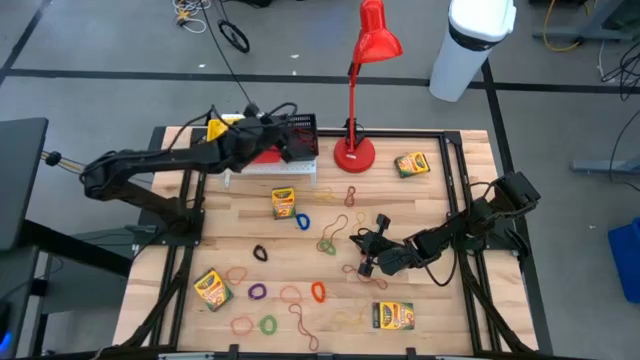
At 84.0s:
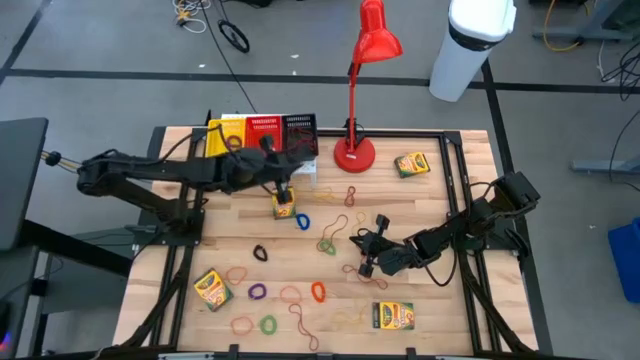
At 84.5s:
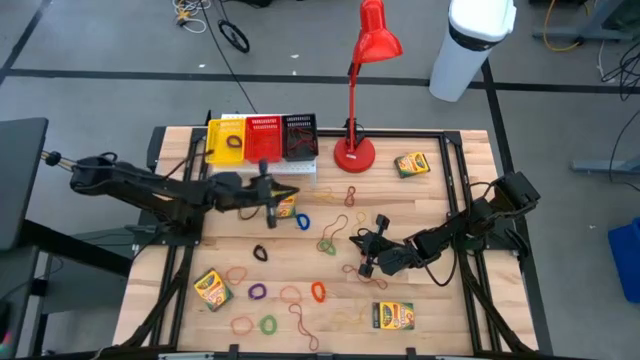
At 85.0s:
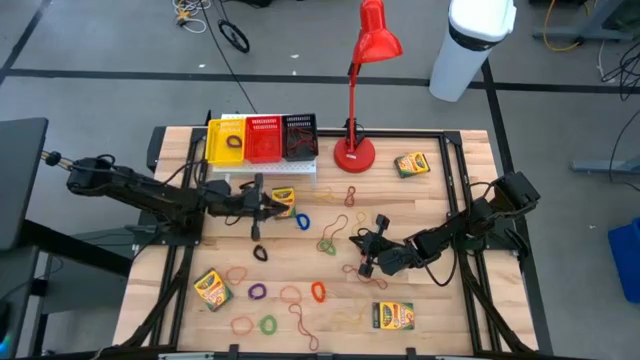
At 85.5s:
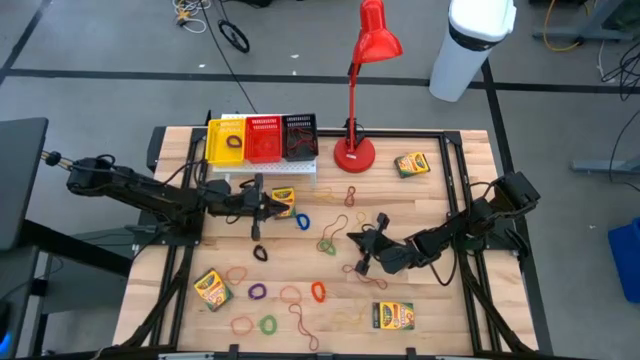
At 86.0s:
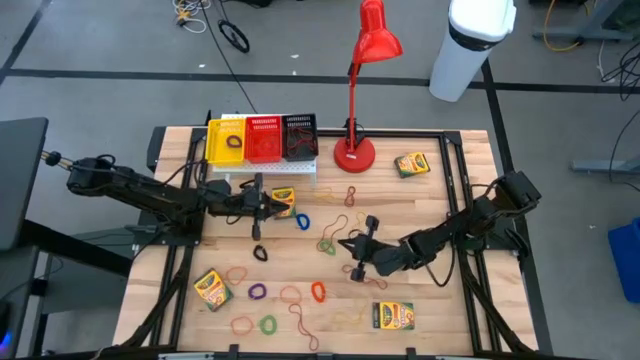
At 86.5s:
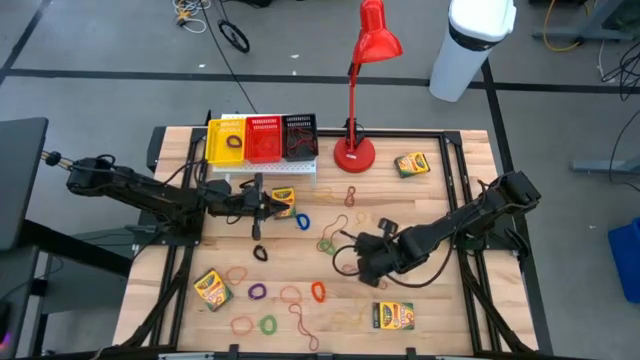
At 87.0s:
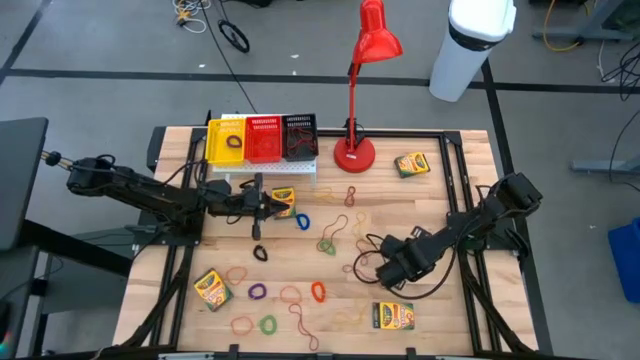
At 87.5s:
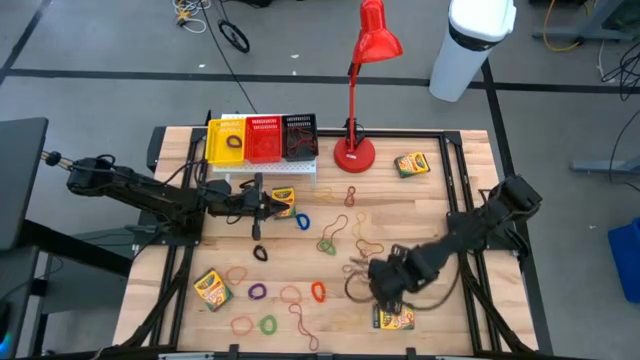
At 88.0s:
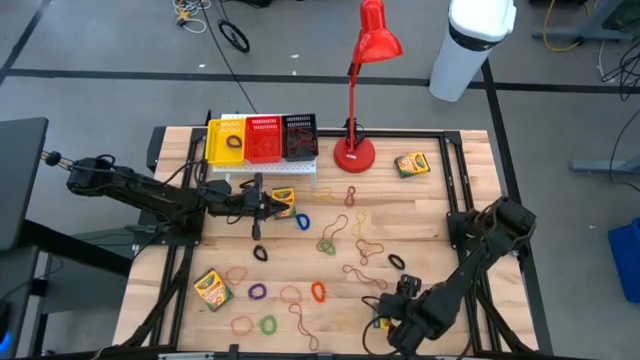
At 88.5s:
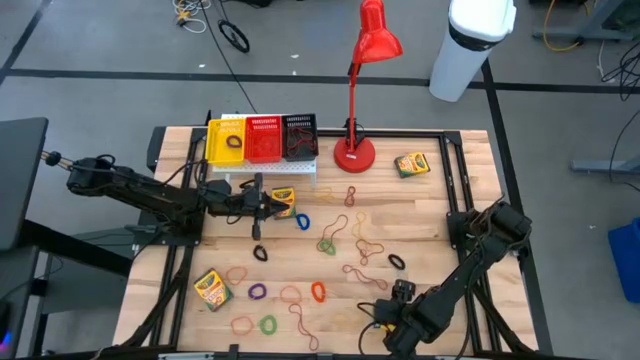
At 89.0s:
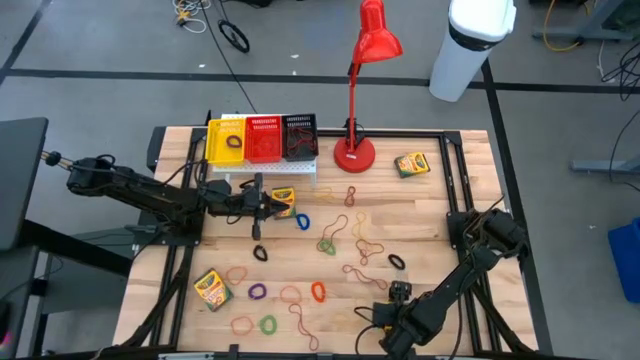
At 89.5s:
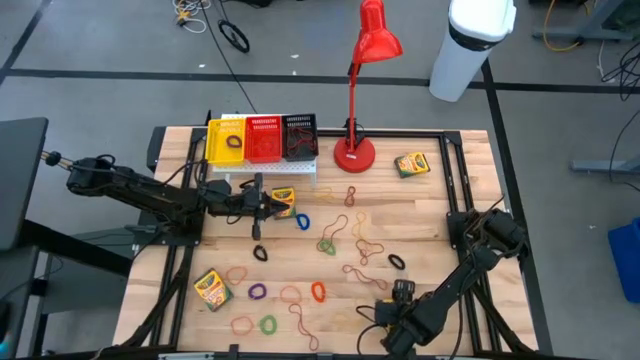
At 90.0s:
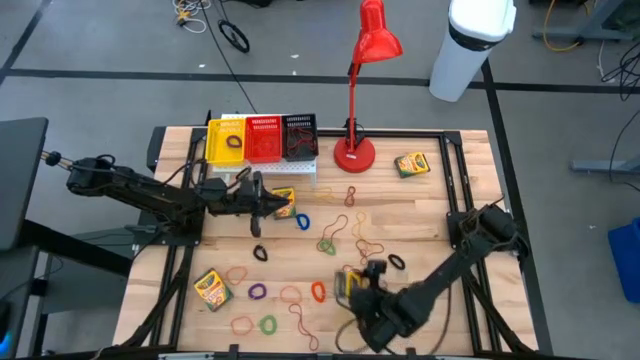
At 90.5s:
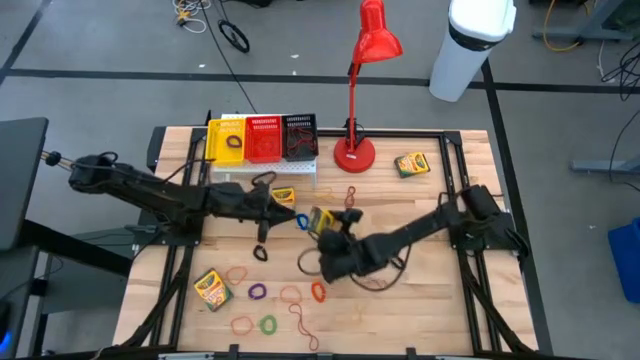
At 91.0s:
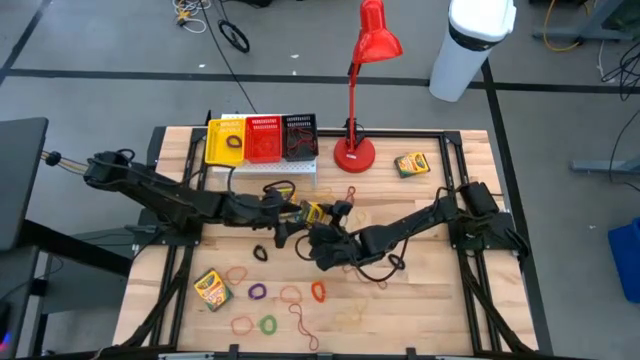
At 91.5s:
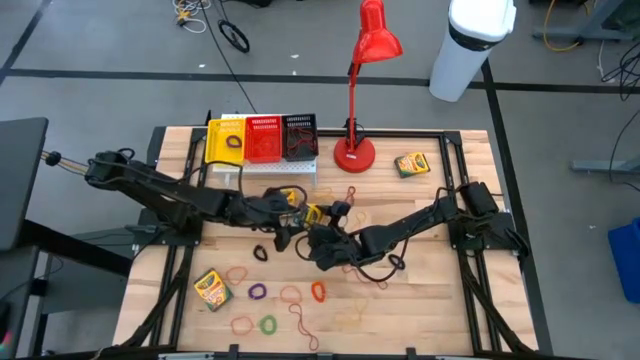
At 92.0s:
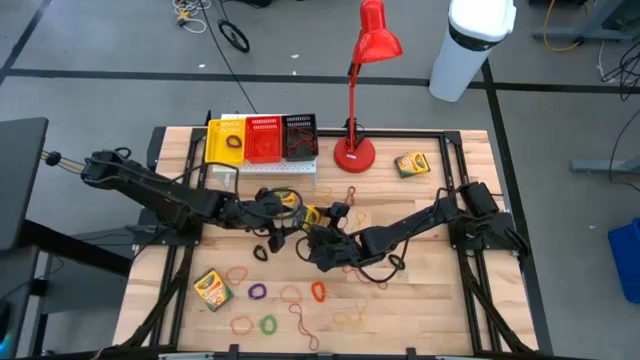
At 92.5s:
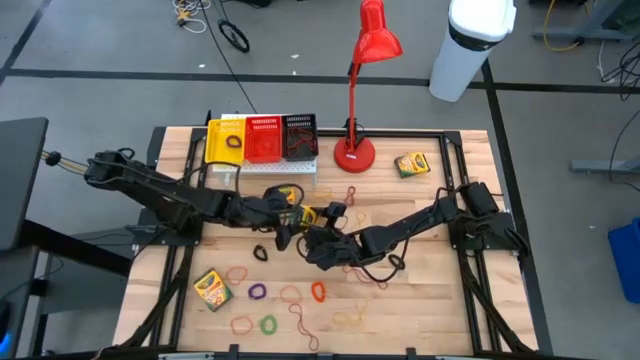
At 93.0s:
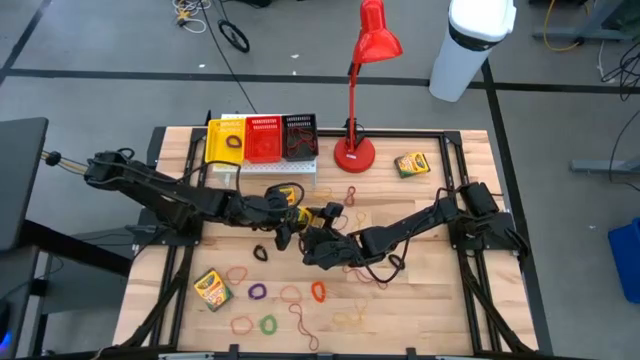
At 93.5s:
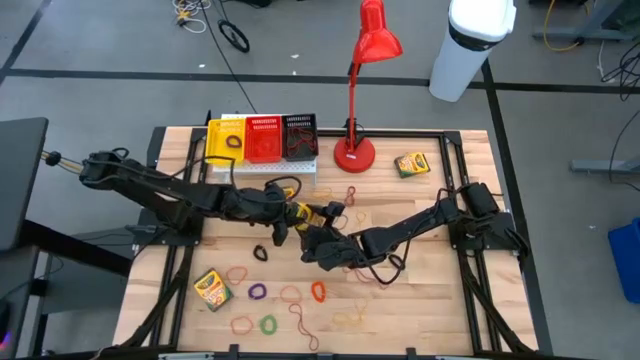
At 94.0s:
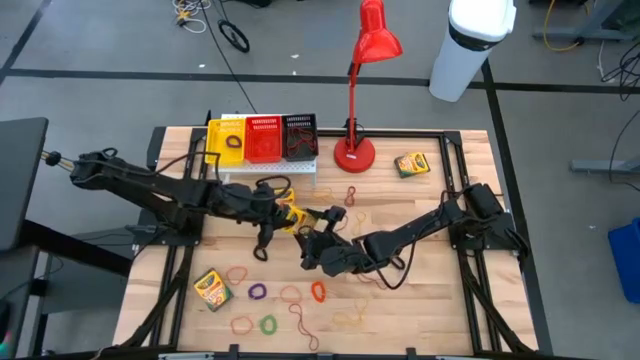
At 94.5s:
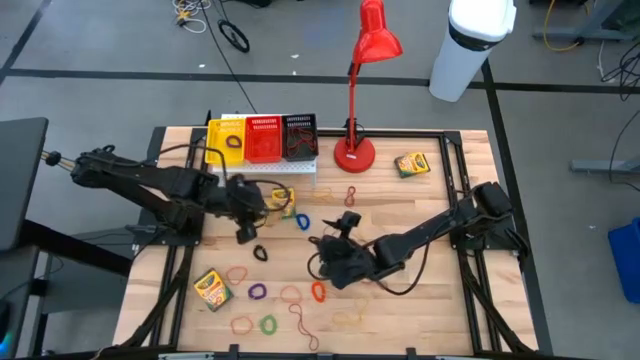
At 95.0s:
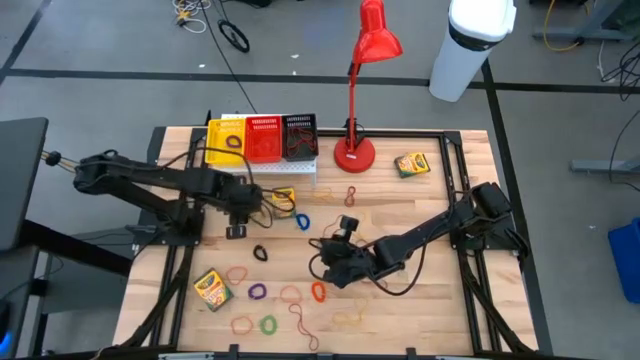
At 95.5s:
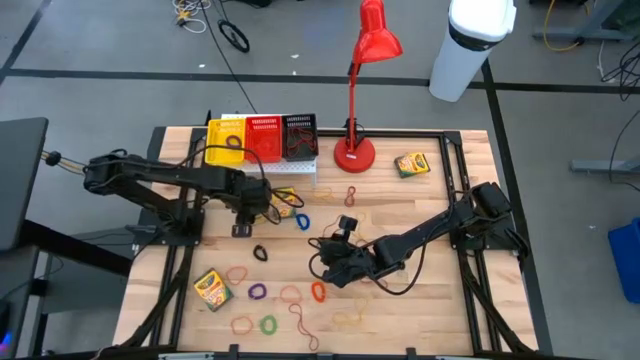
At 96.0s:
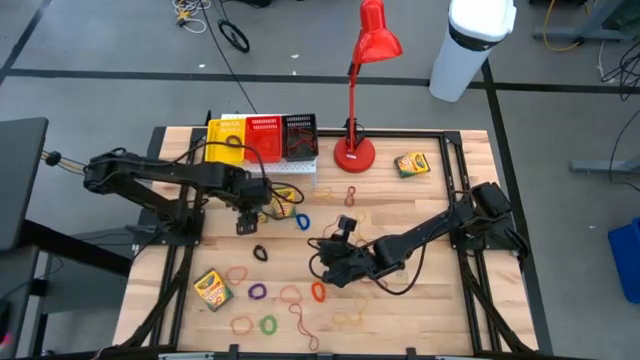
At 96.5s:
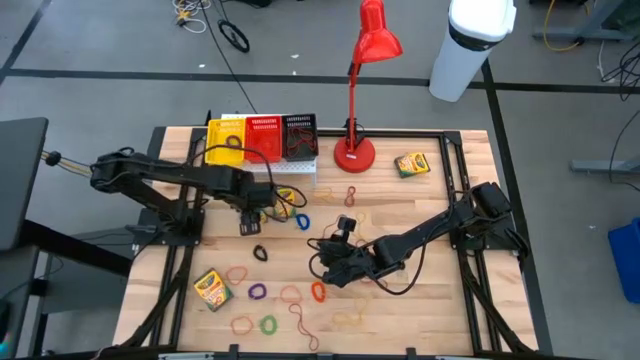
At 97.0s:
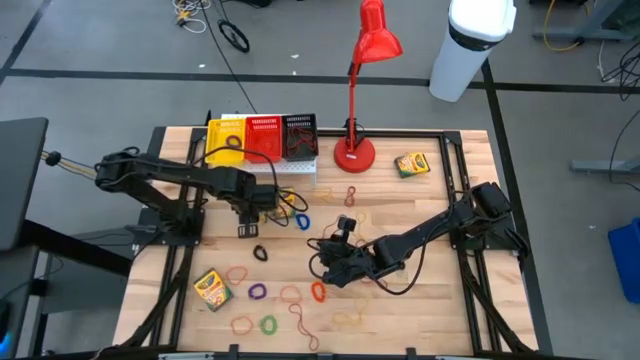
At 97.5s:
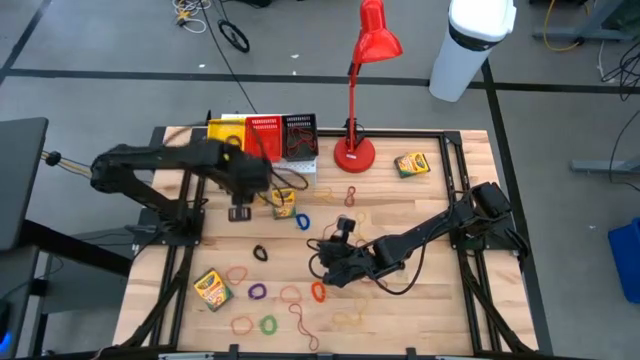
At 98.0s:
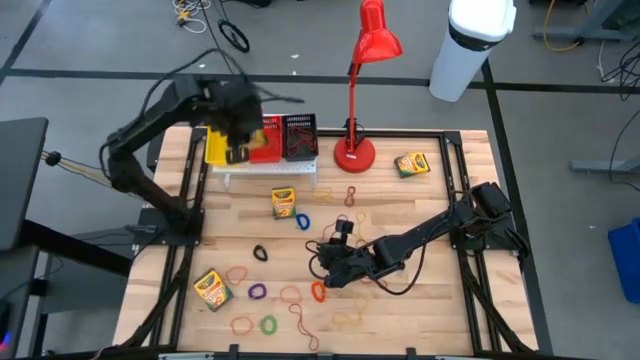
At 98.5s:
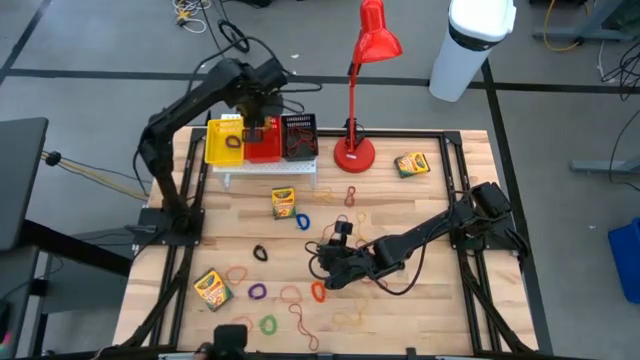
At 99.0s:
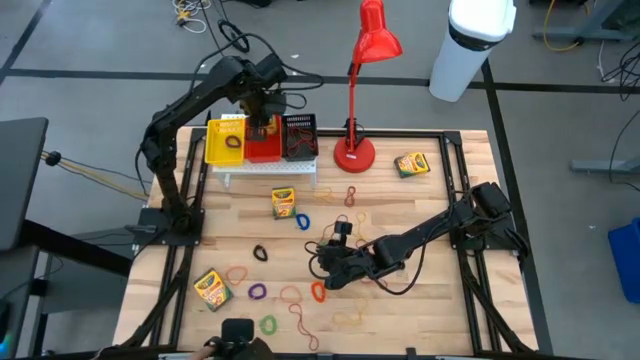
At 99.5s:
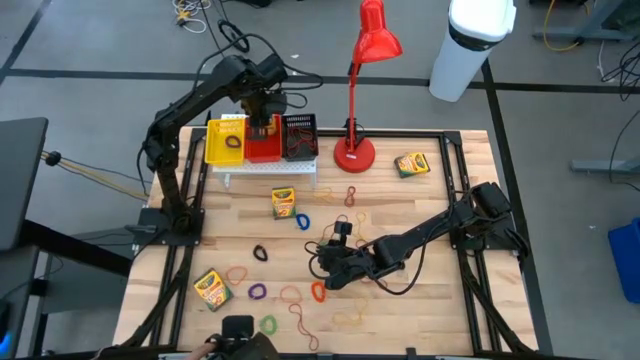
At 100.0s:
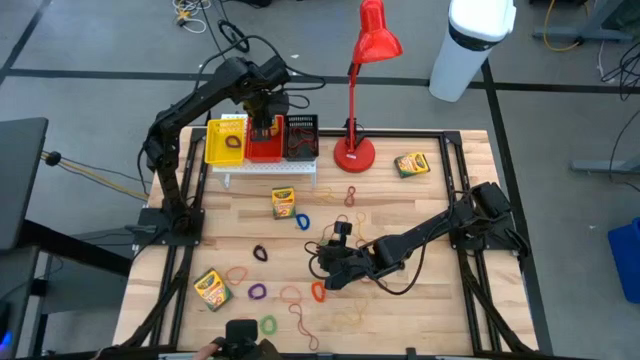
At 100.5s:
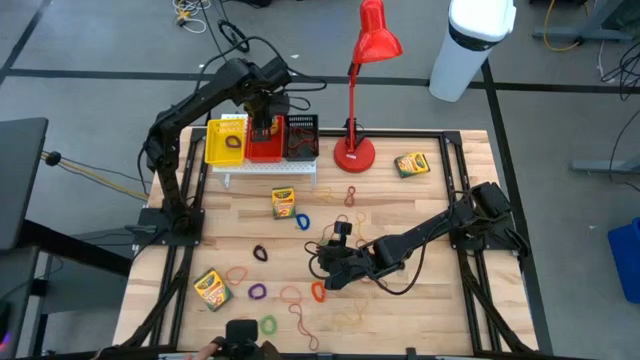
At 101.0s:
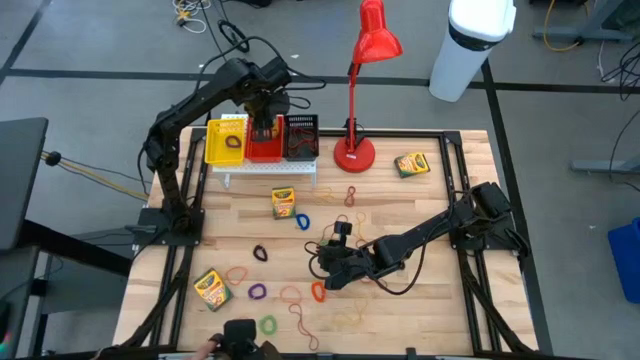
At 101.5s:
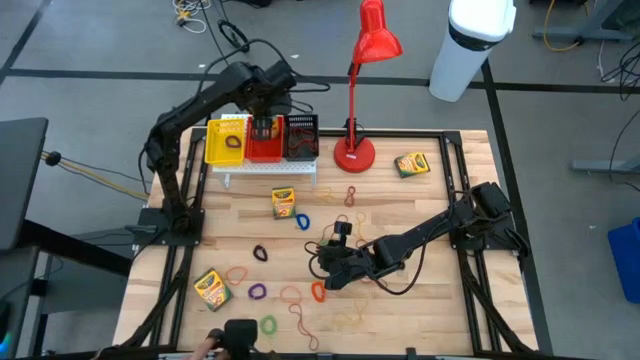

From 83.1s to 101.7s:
Task: Pick & Place Office Desk Supplies
Put the crayon box into the red bin on the shelf

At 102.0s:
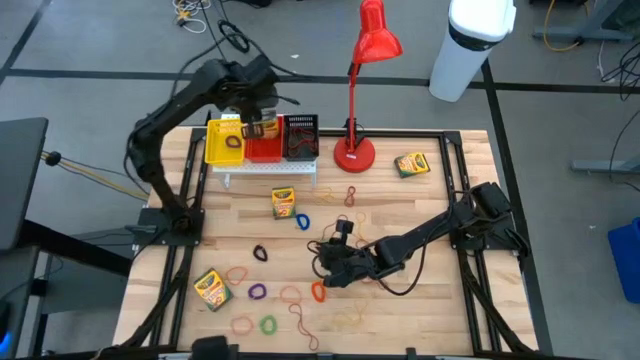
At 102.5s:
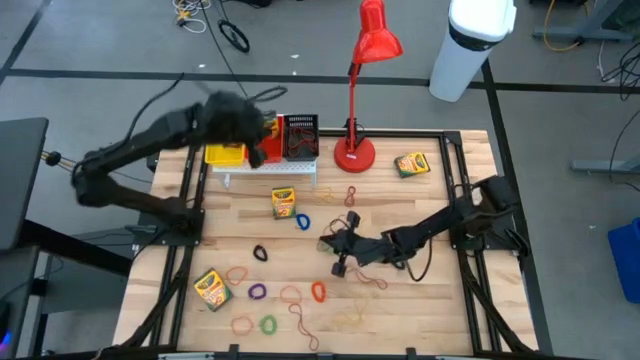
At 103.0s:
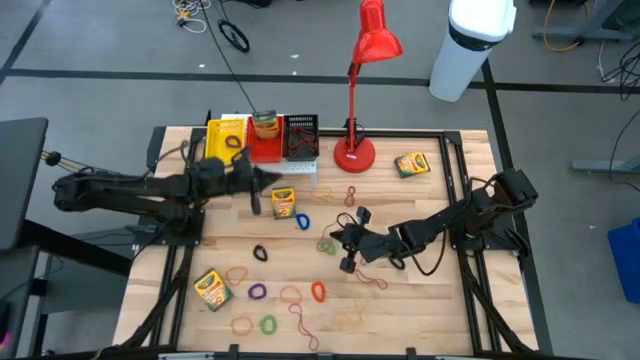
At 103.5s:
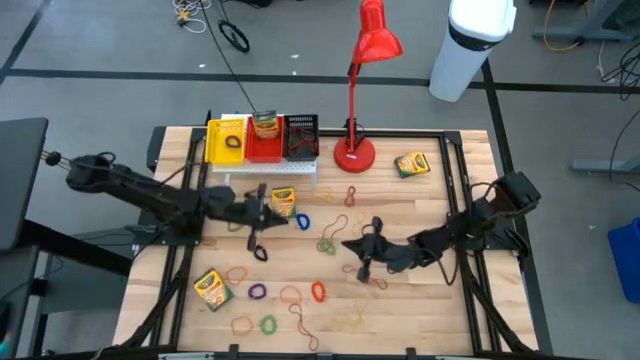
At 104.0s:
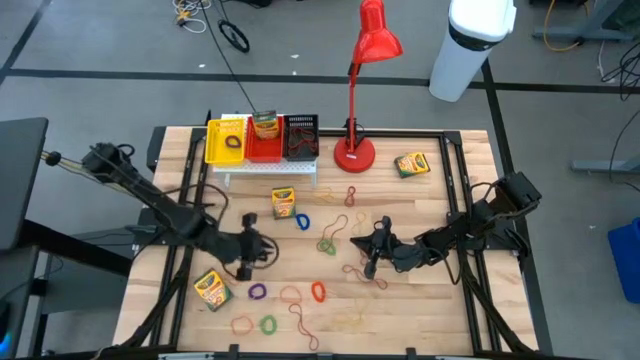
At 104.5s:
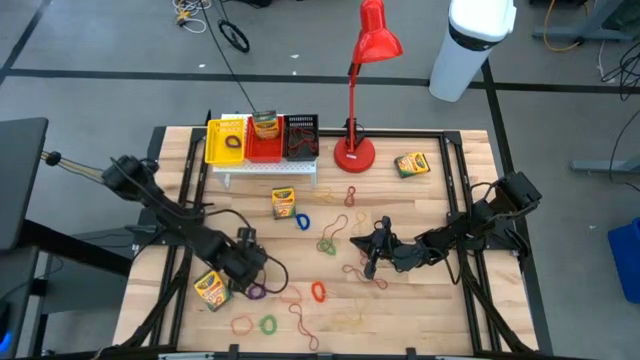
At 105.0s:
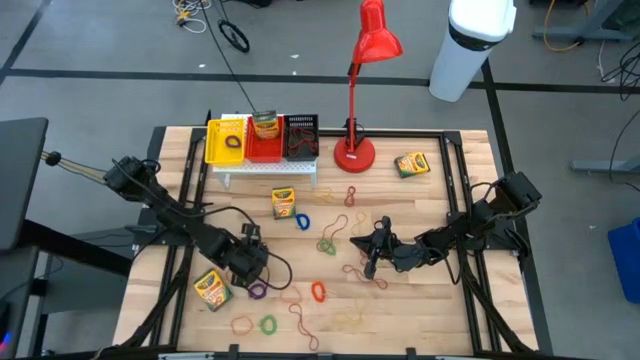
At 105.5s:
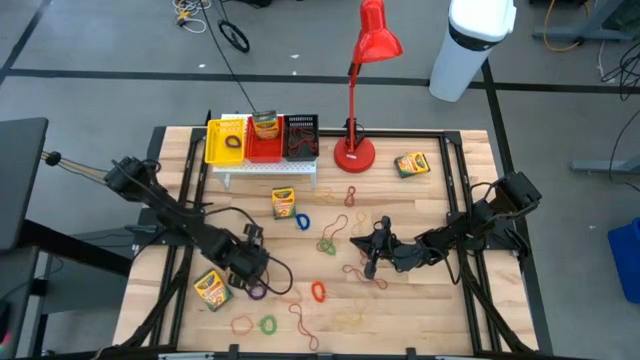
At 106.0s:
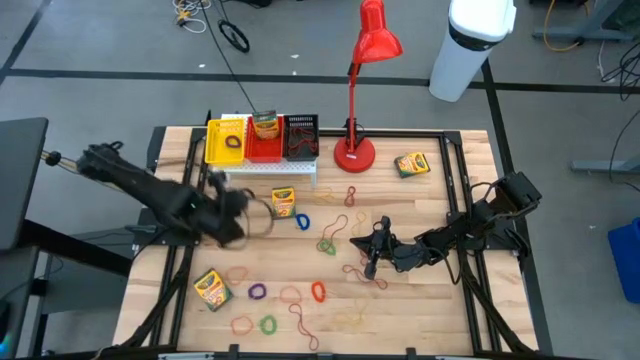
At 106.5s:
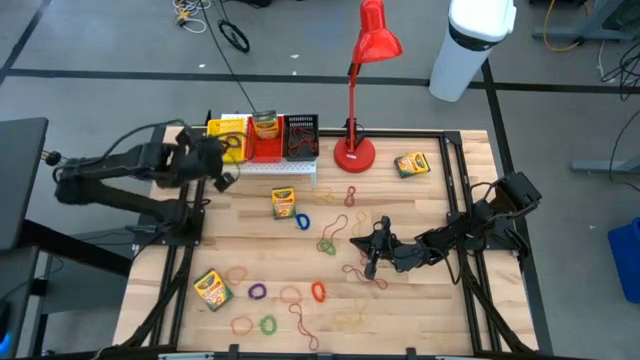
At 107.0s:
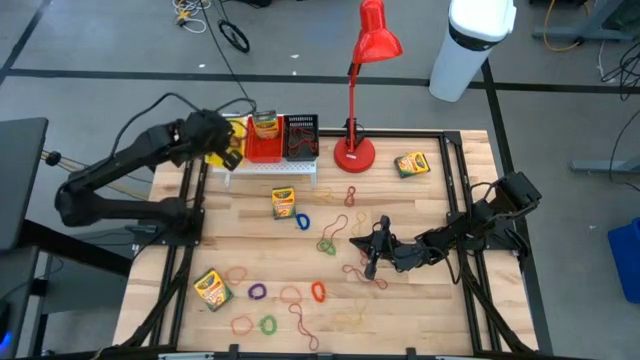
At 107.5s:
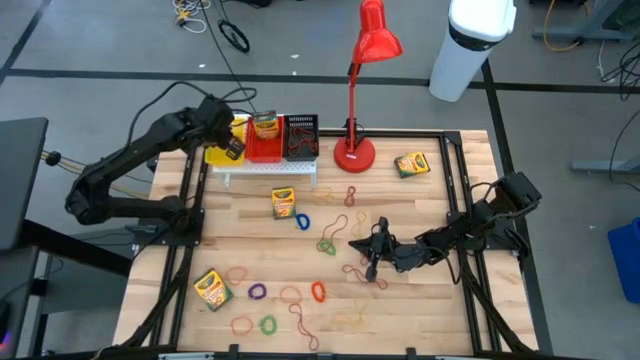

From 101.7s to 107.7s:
Put the black spring rubber band into the yellow bin on the shelf
